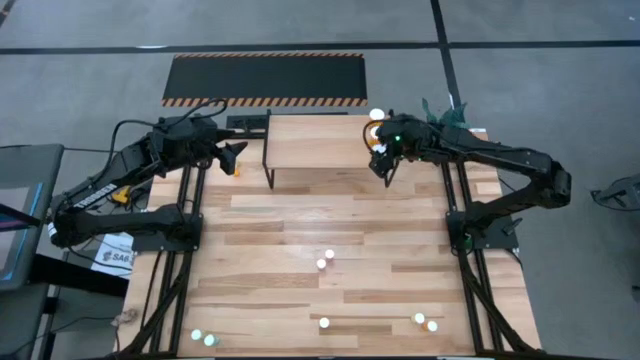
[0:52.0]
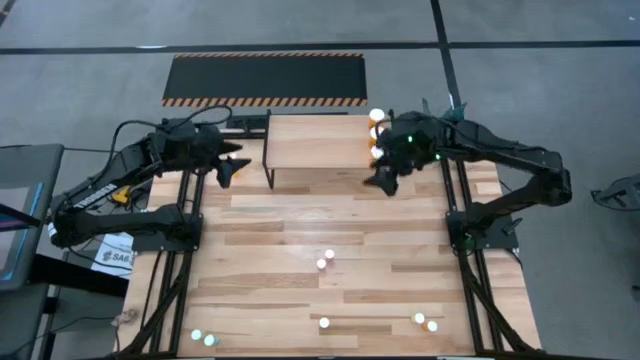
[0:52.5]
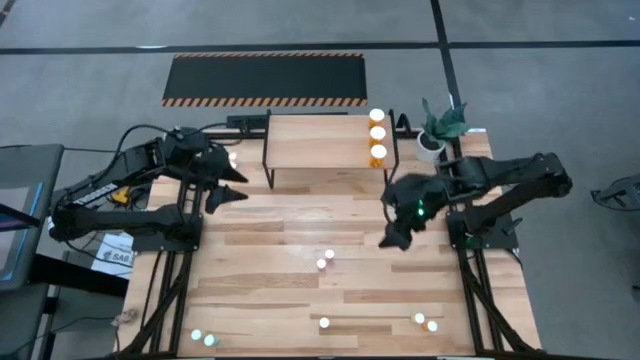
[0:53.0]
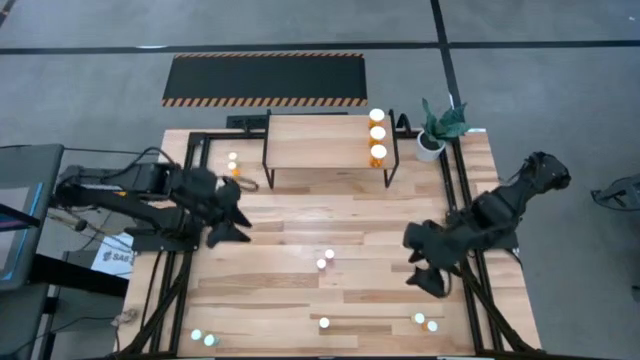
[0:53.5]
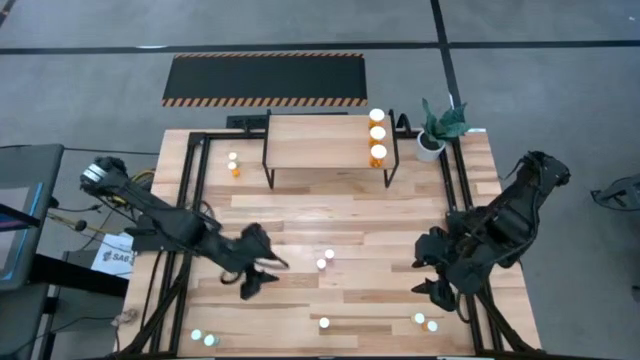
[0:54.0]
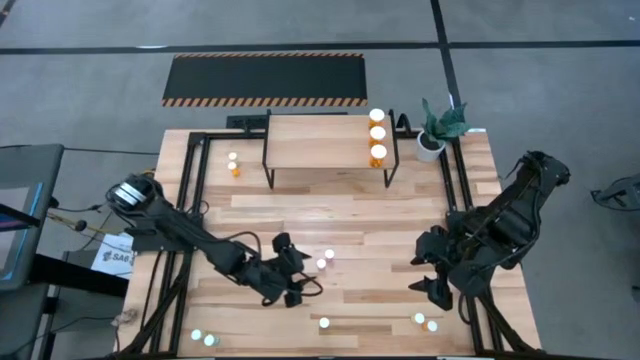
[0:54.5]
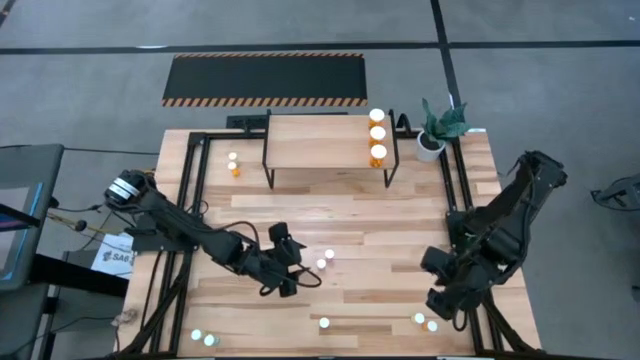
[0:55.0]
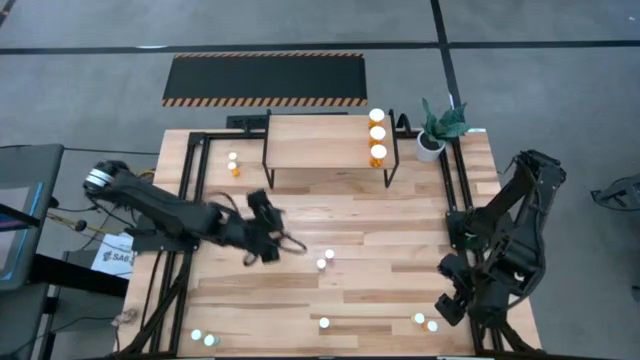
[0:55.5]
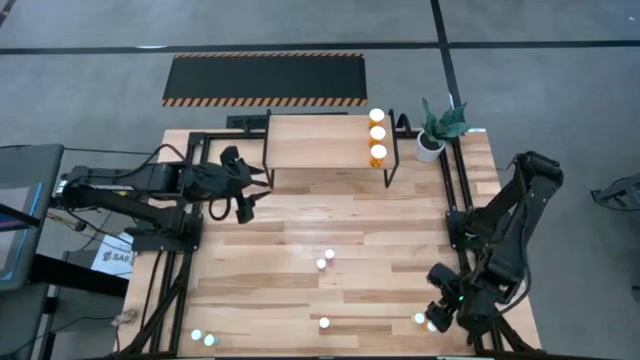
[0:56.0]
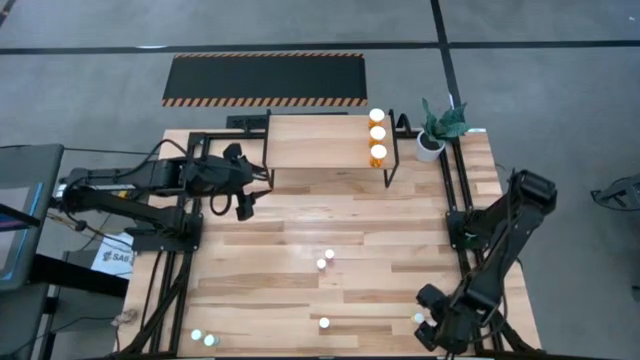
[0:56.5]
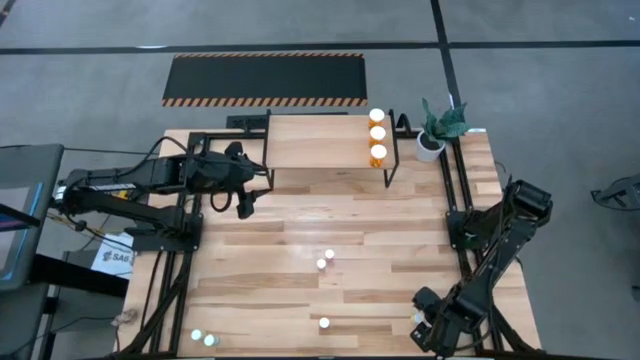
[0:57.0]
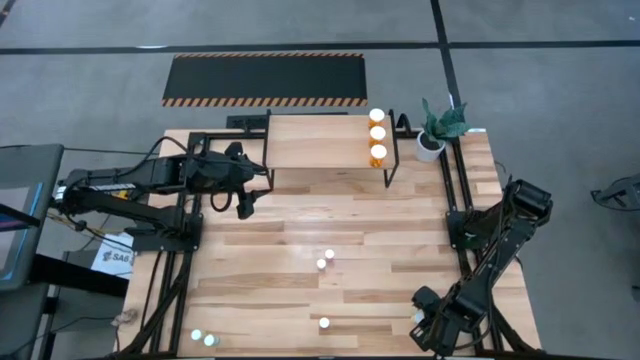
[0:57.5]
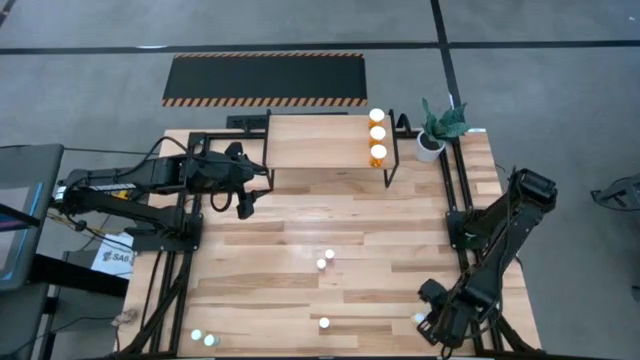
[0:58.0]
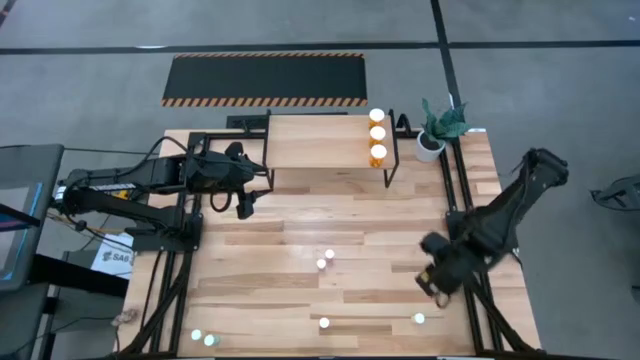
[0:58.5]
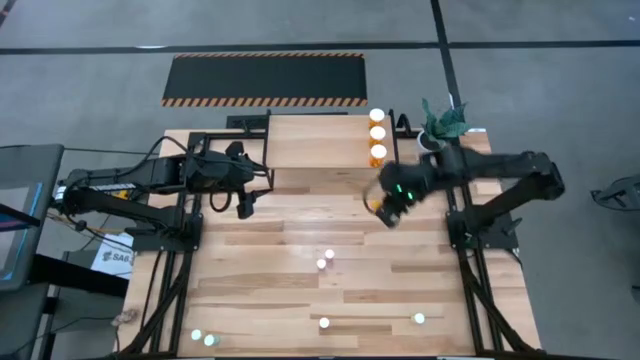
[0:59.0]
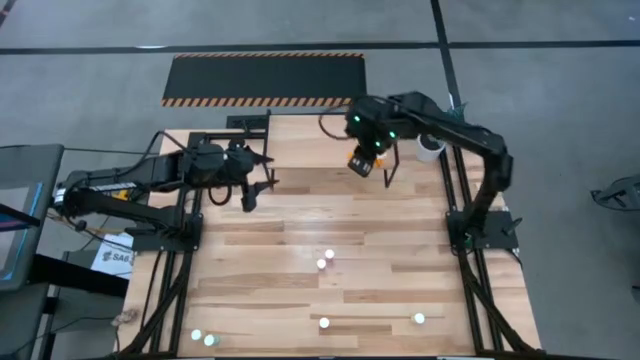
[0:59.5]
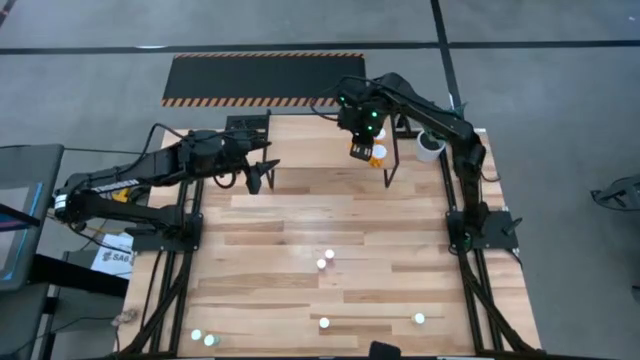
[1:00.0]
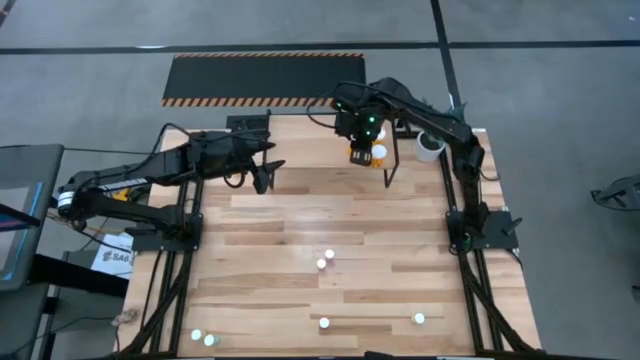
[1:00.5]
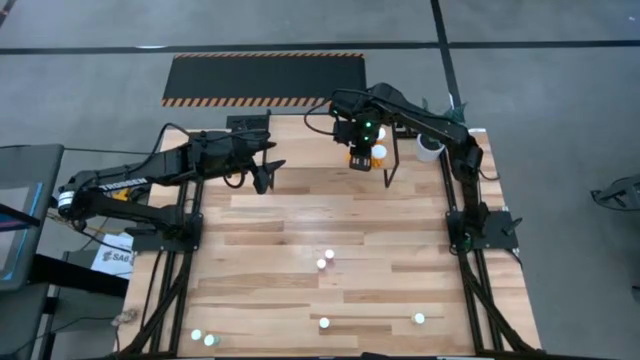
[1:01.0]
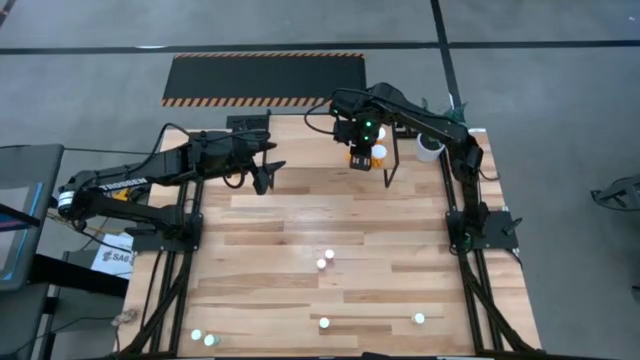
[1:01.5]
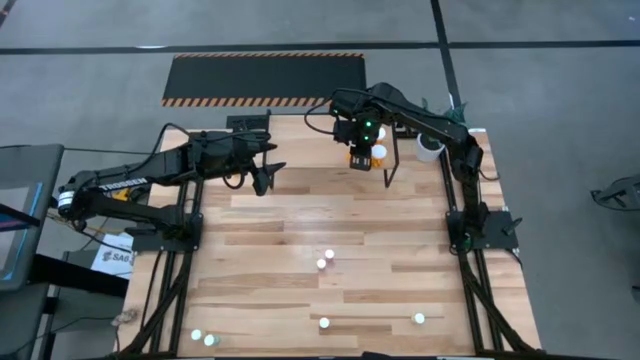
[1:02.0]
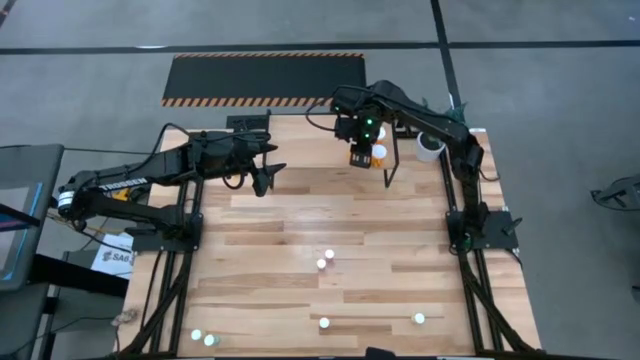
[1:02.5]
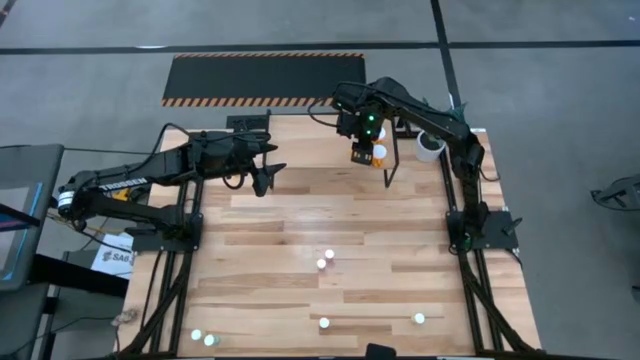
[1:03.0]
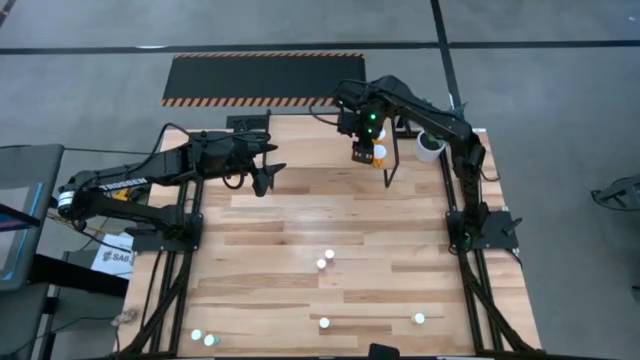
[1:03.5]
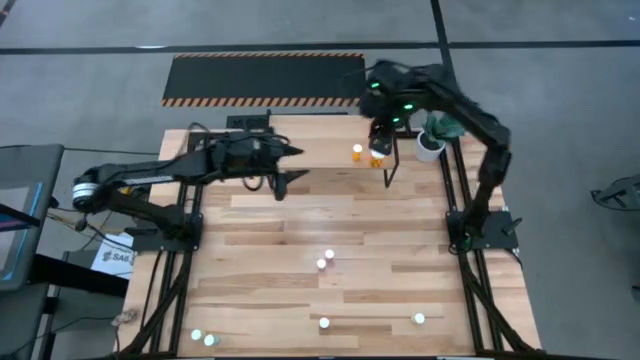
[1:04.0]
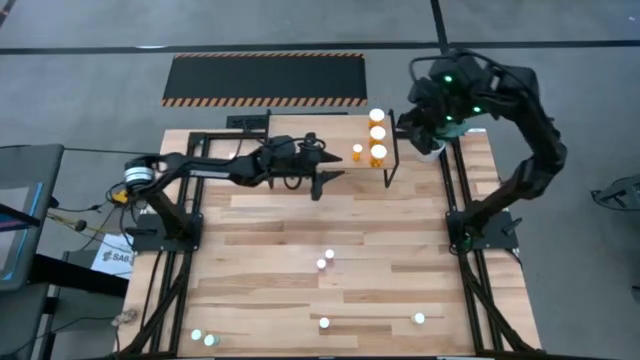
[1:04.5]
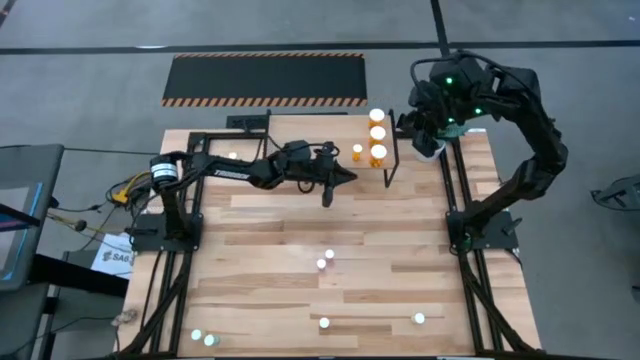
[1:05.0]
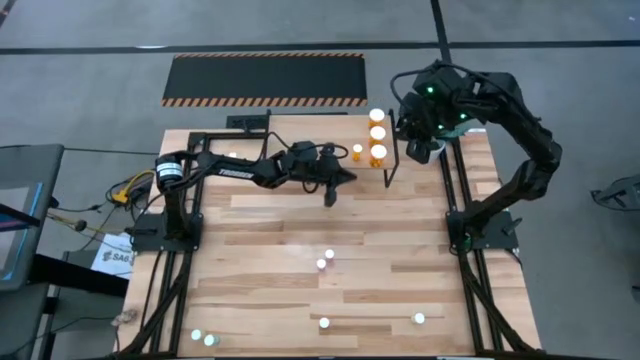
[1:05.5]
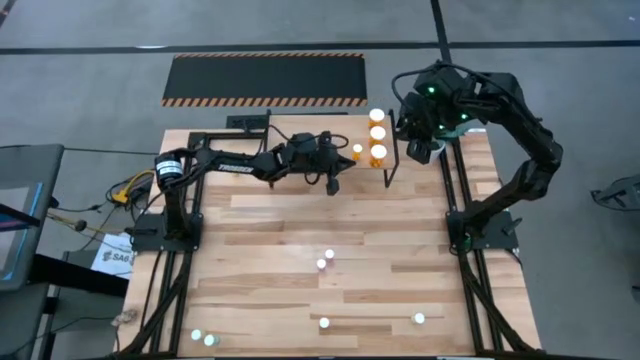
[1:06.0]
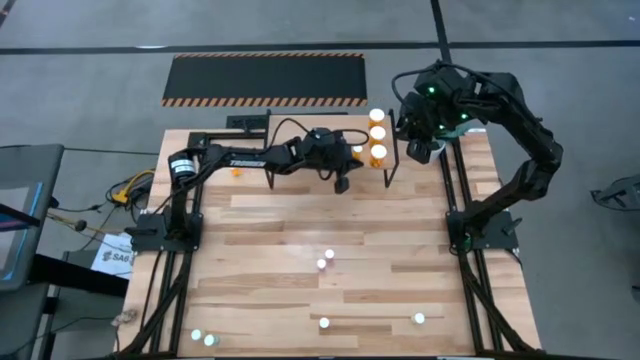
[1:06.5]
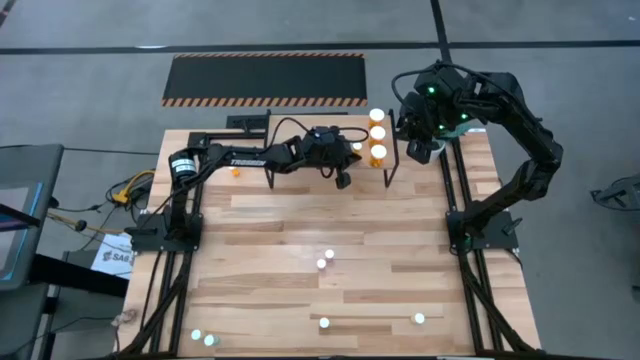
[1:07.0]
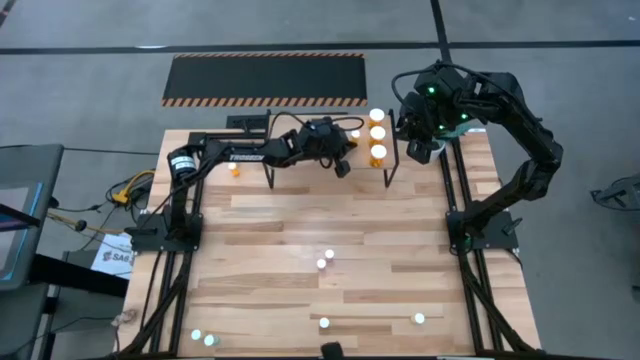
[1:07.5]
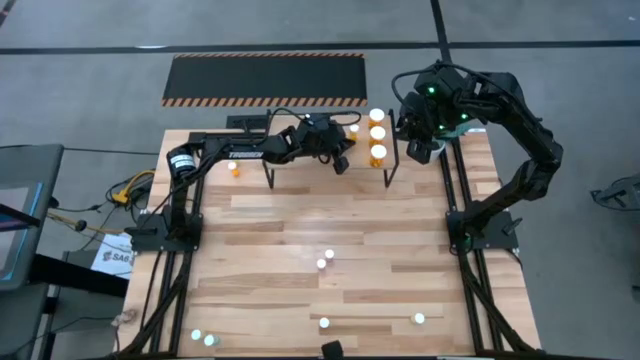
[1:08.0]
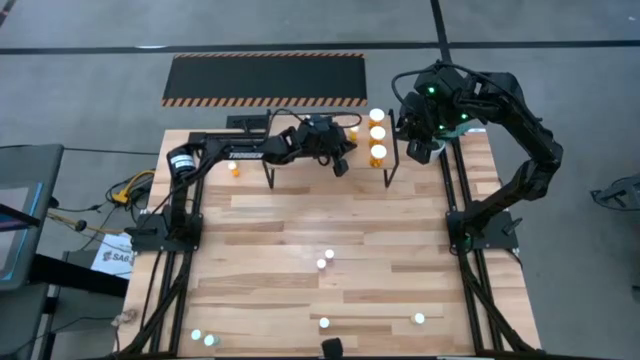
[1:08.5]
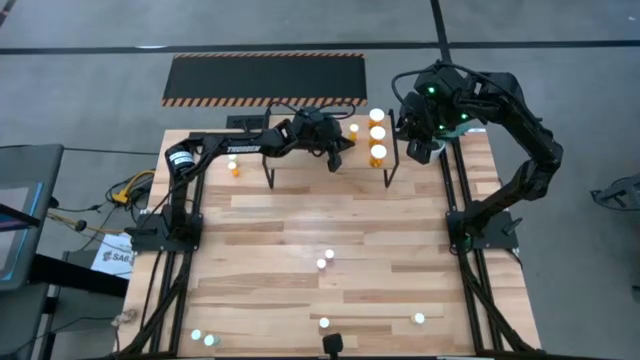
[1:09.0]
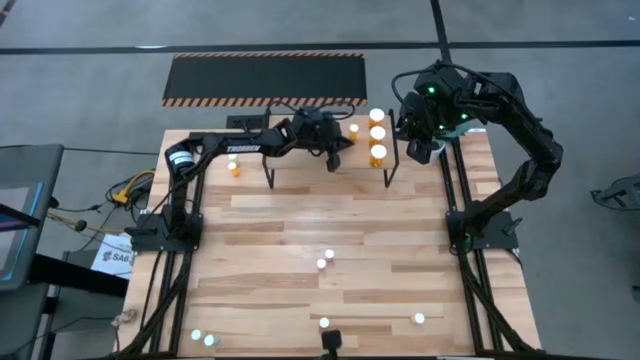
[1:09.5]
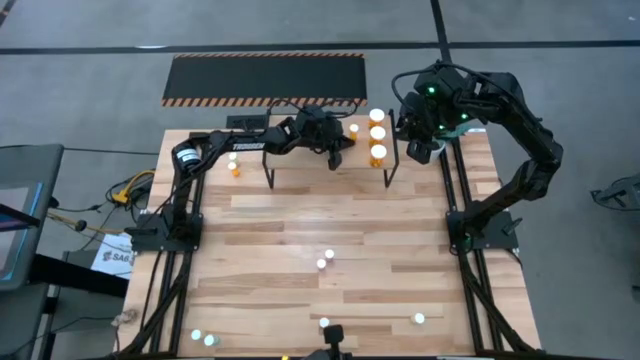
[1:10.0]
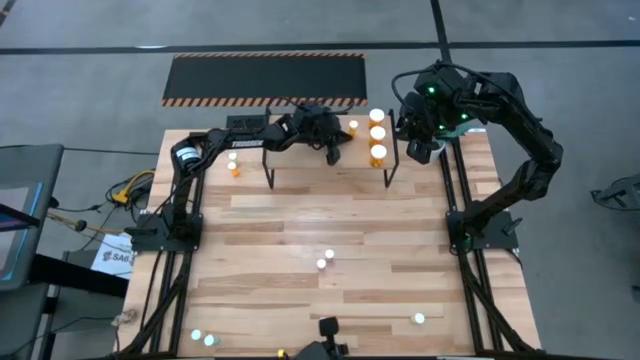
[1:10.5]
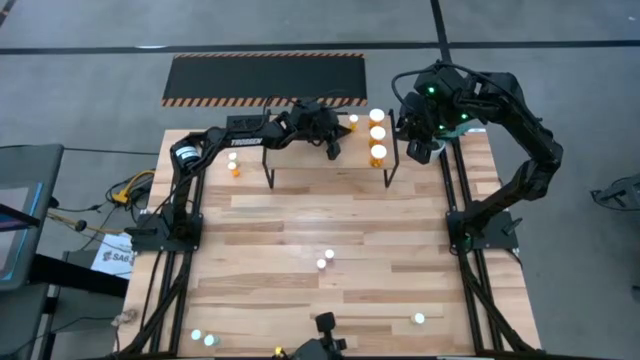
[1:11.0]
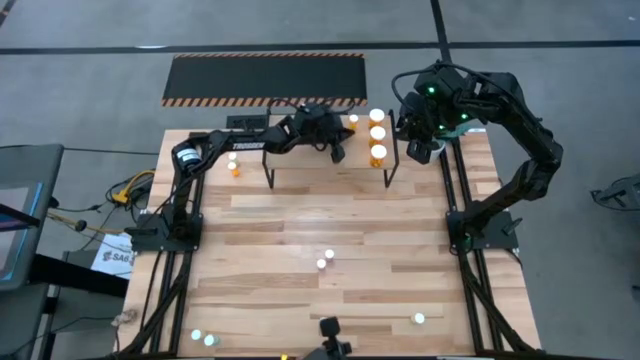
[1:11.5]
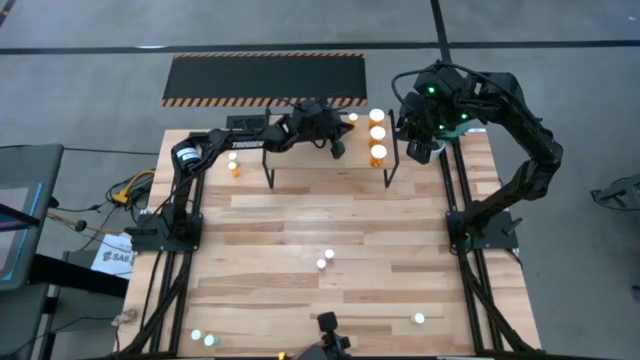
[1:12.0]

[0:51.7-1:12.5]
Task: Pick and place medicine bottles onto shelf by color
Put the right small orange pill bottle on the shelf
